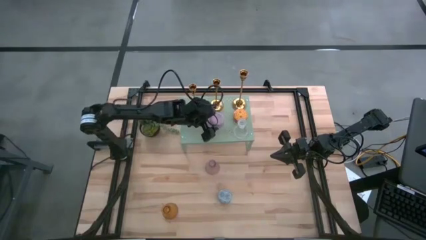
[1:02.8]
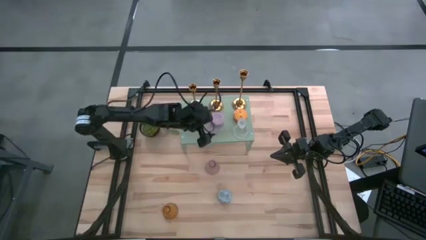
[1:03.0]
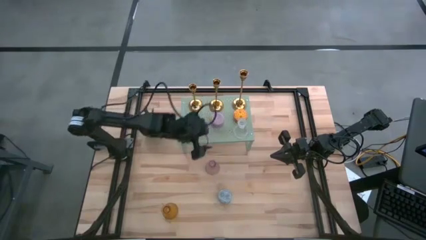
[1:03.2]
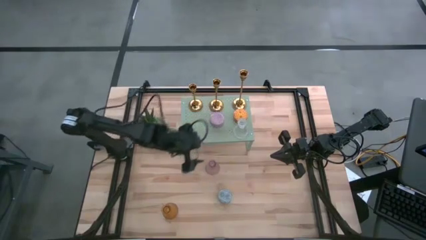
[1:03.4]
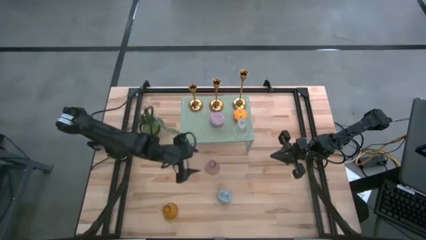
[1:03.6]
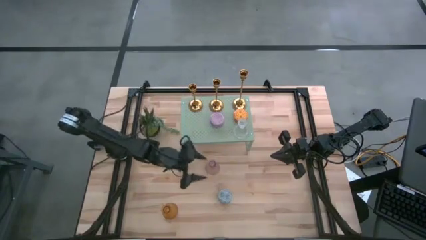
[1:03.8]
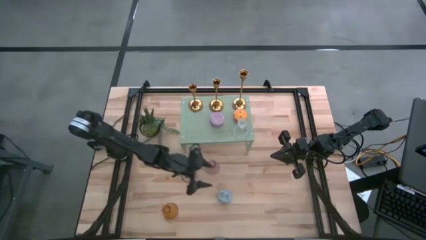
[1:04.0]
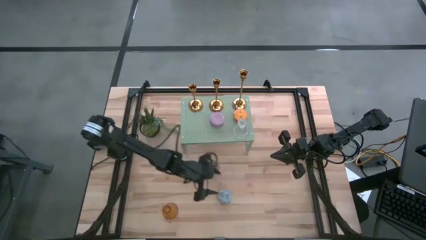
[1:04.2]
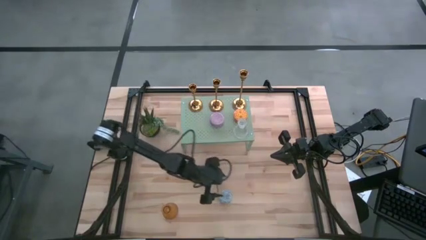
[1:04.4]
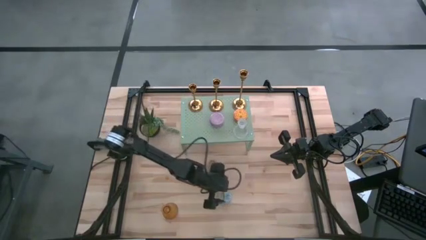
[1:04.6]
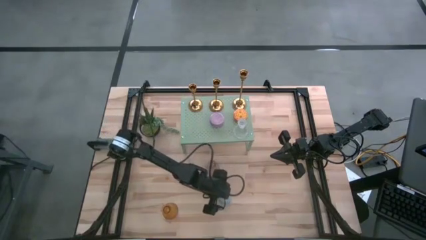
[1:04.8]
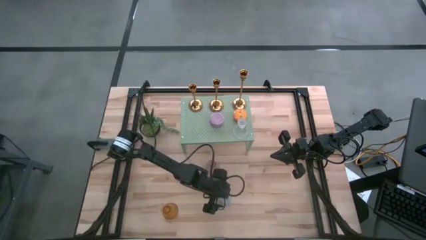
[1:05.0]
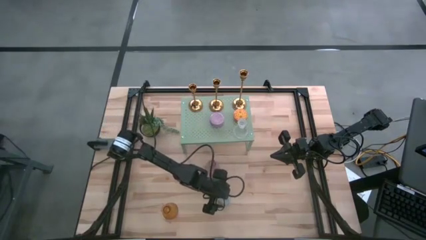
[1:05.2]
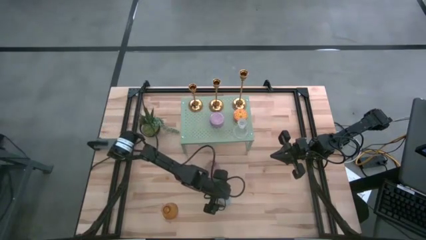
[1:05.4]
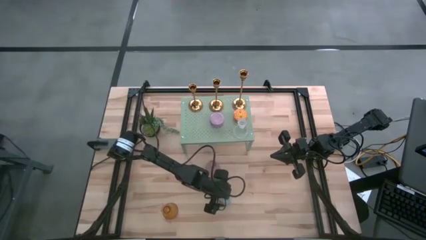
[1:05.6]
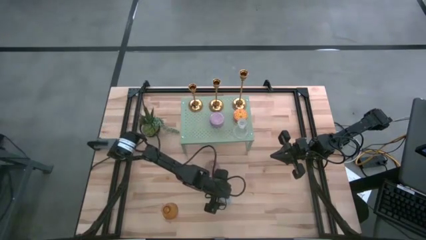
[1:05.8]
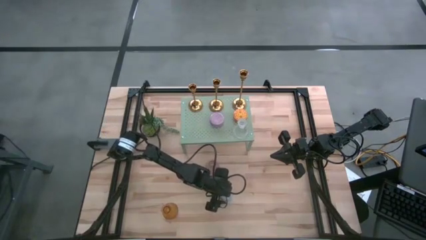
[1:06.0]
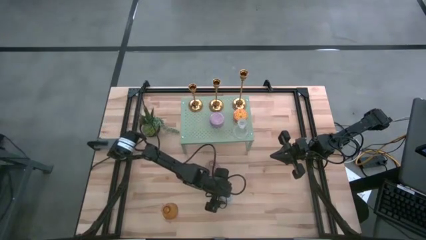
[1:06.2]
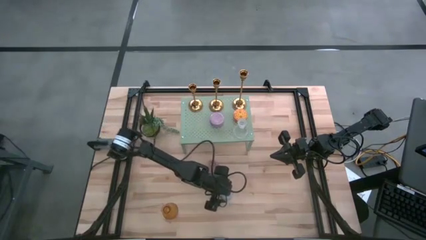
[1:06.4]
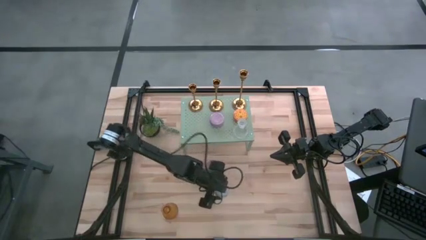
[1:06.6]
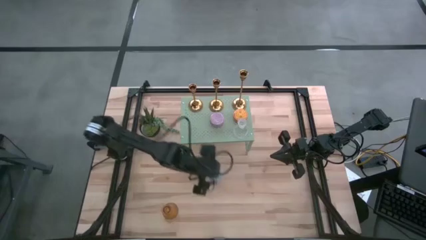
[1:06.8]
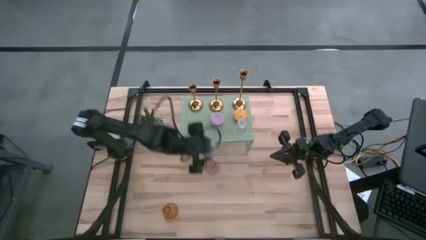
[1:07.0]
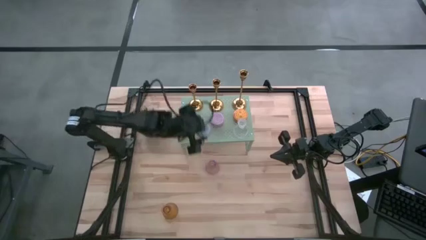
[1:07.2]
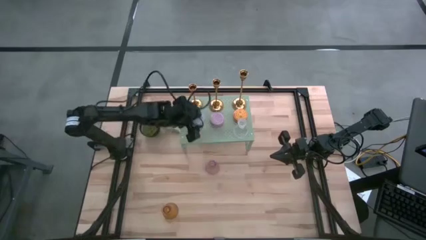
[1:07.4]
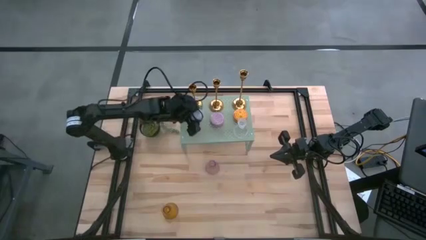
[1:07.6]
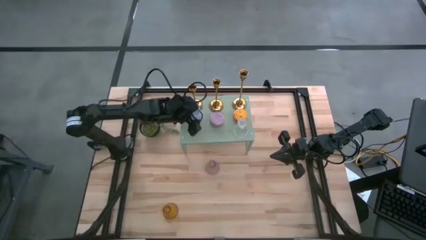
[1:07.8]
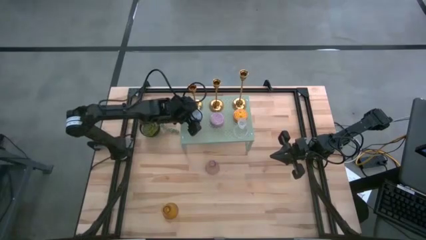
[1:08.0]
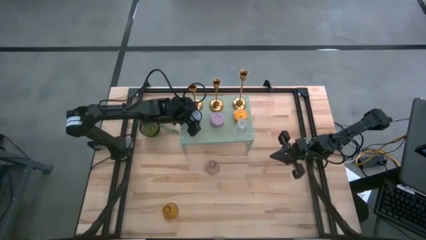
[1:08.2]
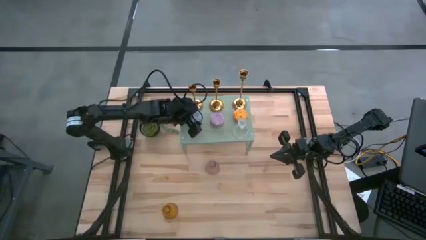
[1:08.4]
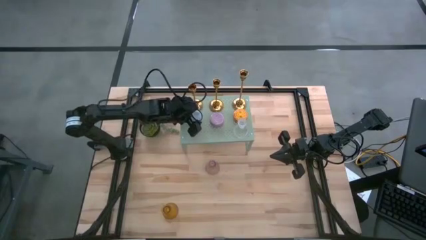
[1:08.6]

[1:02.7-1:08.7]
Task: Pick & Place candle stick holders
Put the blue scented candle on the shelf

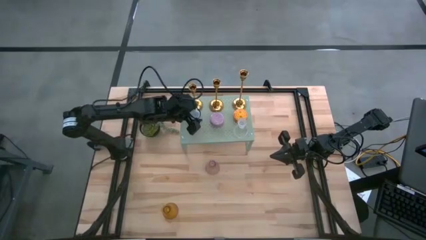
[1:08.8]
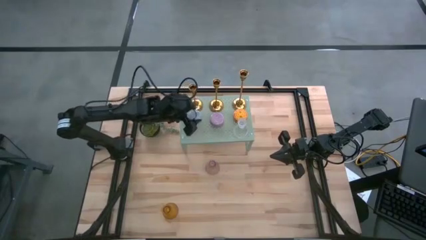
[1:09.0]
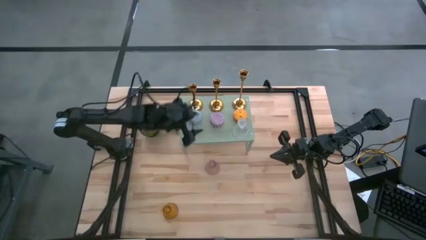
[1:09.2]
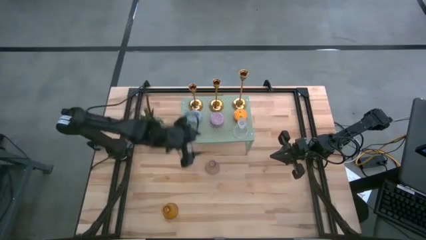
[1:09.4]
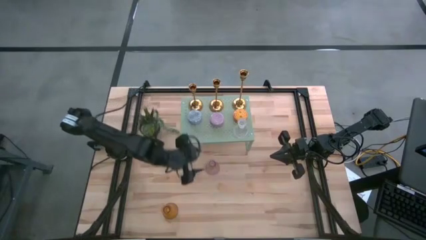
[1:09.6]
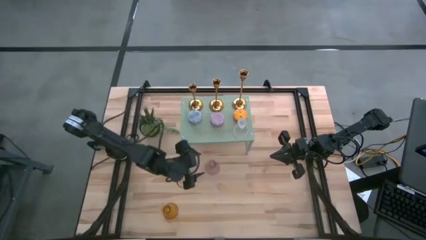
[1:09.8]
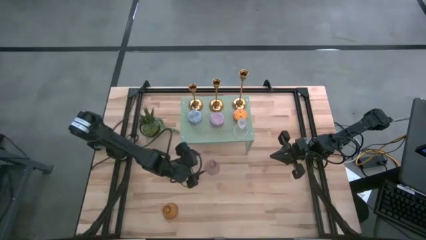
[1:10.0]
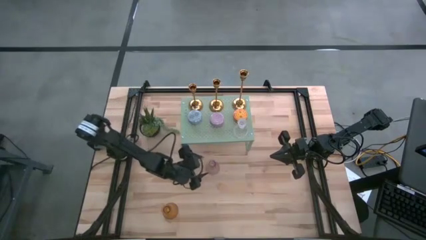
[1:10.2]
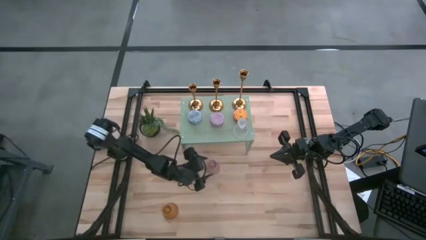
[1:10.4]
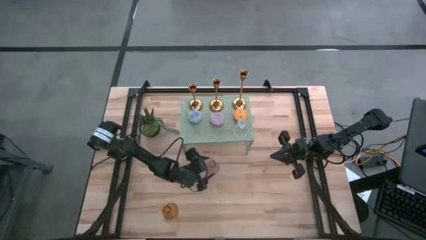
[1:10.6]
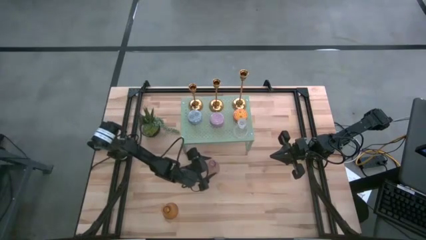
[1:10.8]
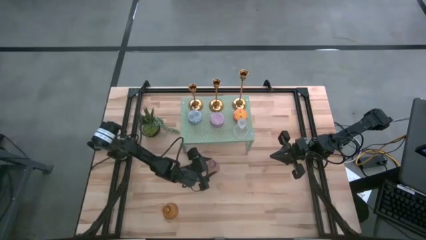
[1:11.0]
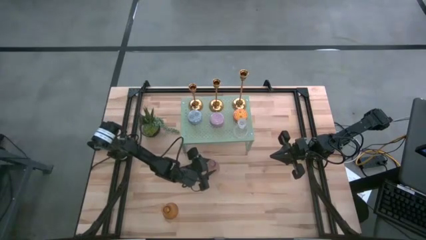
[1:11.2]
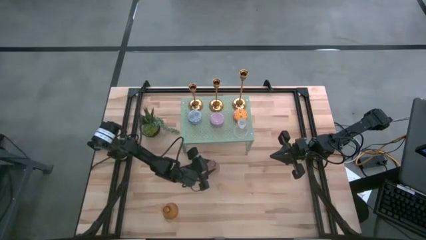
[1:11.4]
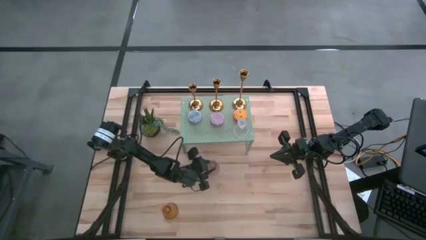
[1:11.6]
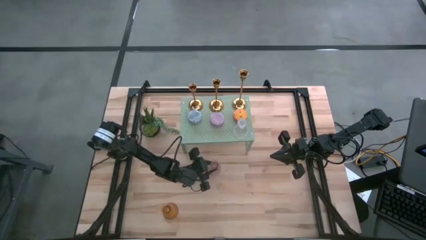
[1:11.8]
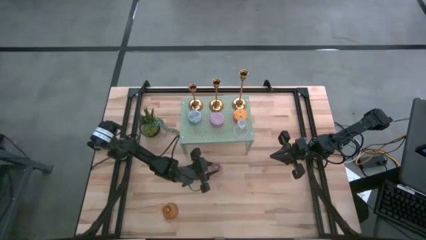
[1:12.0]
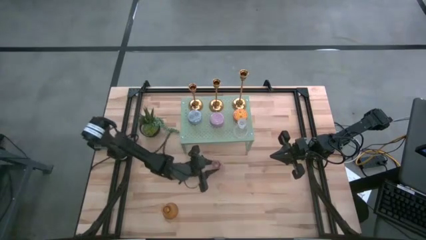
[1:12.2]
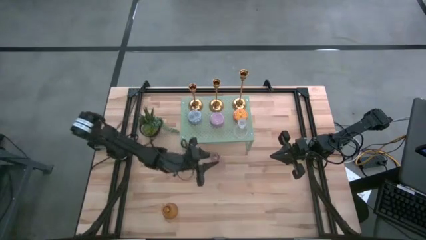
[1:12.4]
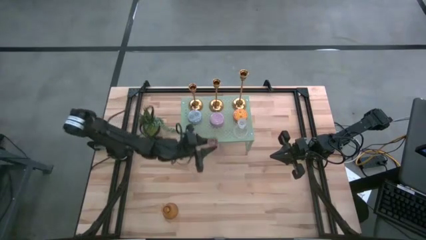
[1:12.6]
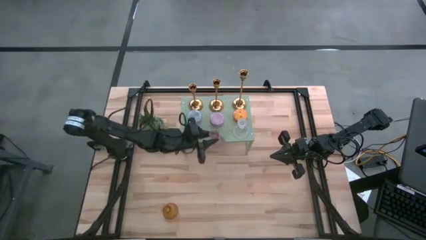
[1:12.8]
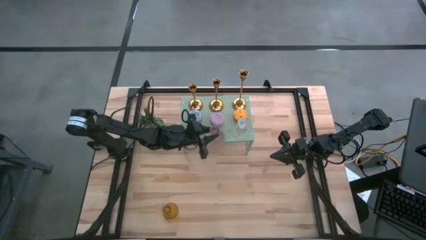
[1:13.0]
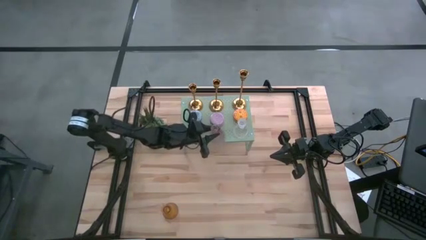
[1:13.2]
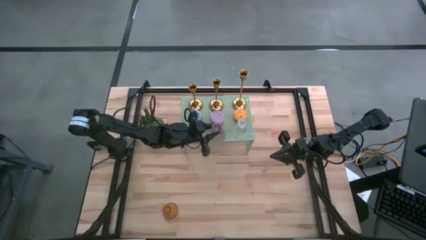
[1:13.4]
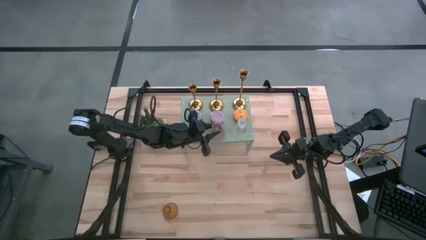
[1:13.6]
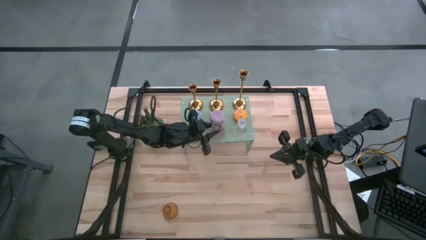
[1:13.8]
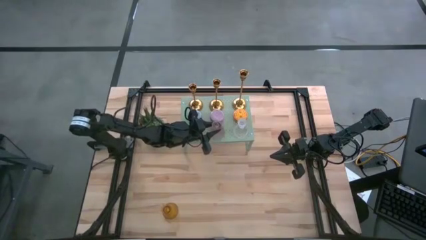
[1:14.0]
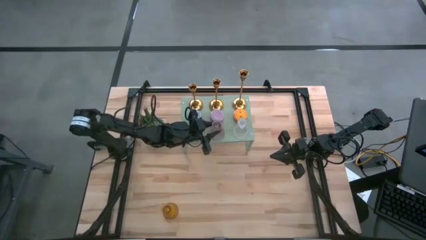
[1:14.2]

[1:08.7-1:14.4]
Put the purple glass candle holder on the shelf

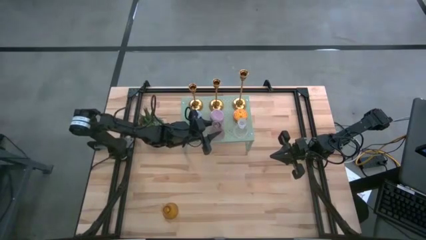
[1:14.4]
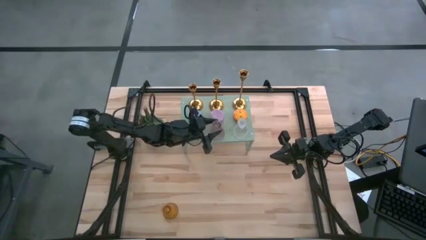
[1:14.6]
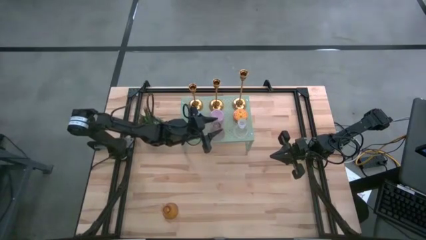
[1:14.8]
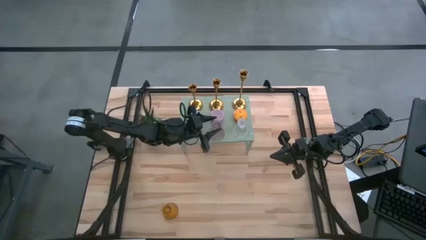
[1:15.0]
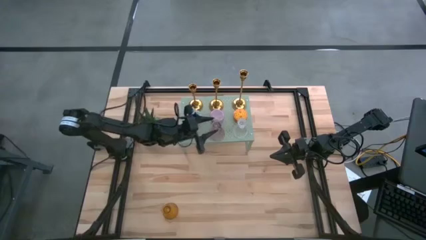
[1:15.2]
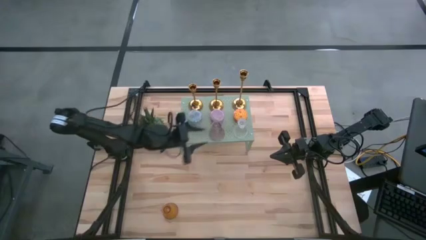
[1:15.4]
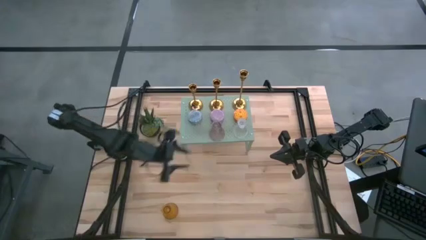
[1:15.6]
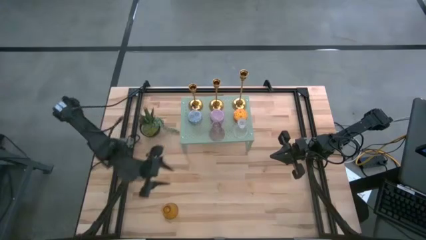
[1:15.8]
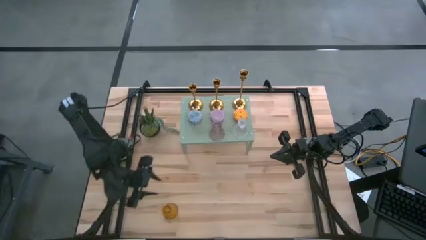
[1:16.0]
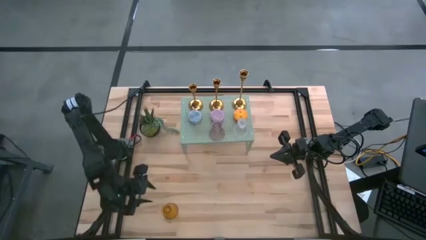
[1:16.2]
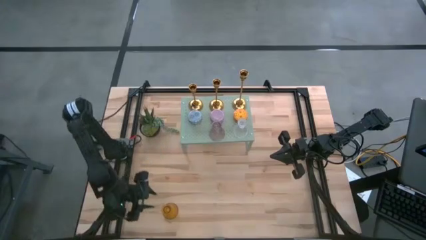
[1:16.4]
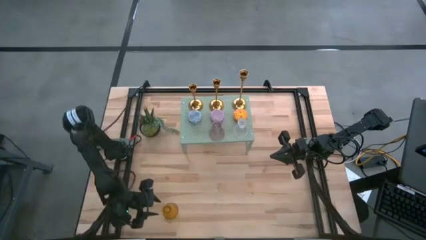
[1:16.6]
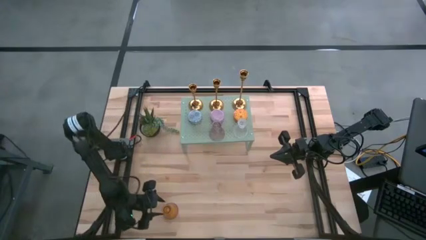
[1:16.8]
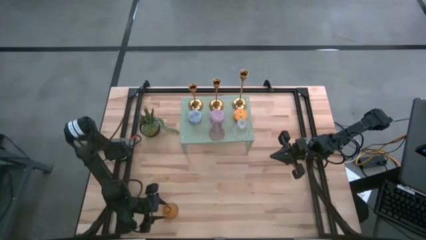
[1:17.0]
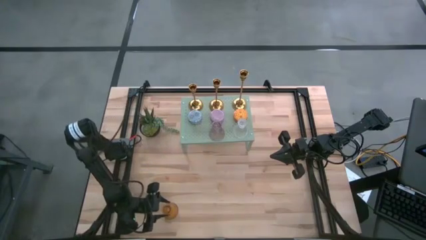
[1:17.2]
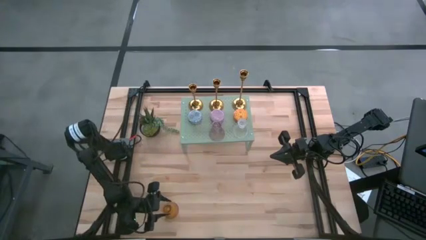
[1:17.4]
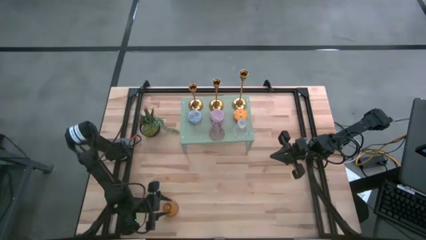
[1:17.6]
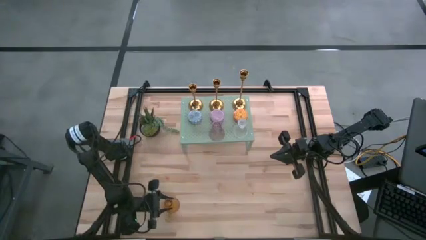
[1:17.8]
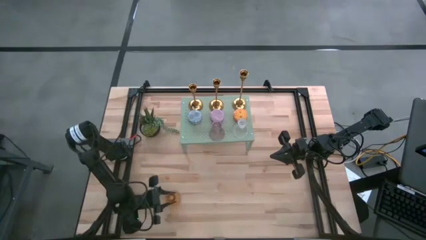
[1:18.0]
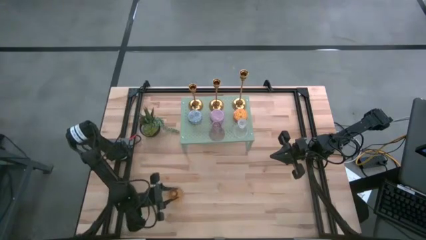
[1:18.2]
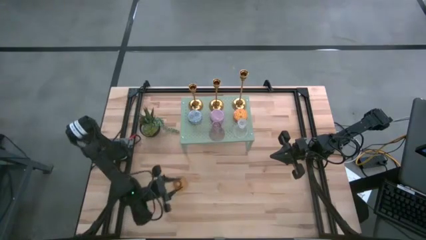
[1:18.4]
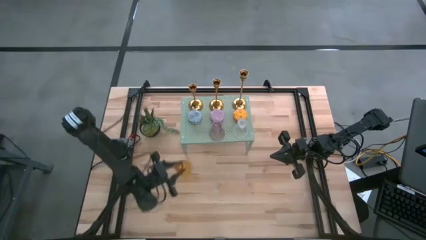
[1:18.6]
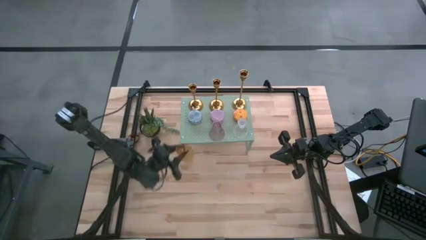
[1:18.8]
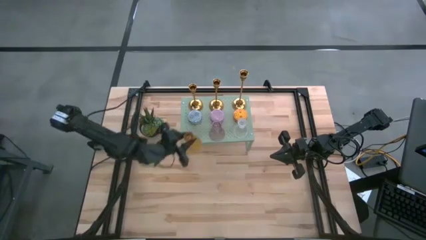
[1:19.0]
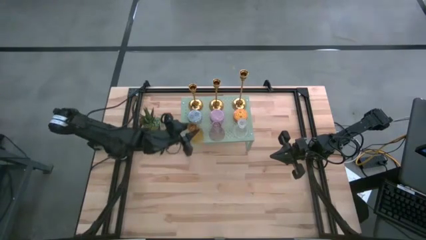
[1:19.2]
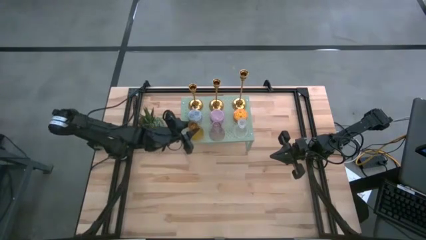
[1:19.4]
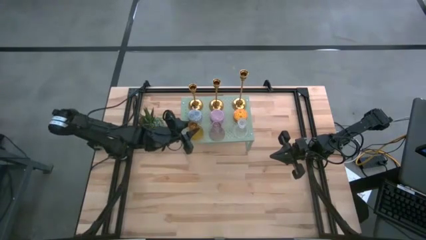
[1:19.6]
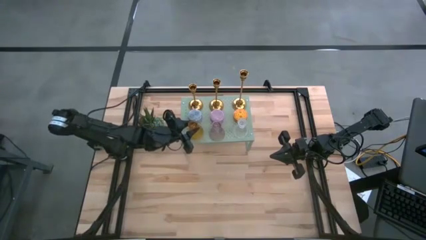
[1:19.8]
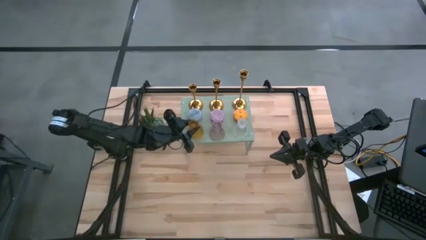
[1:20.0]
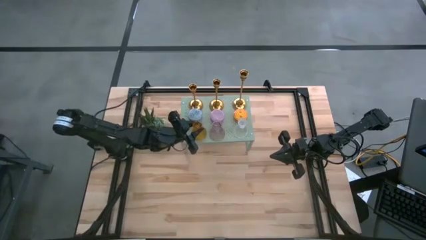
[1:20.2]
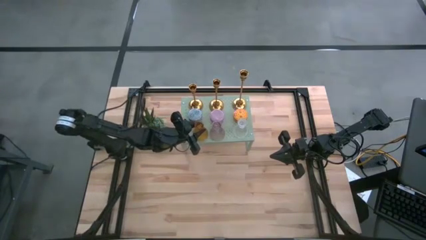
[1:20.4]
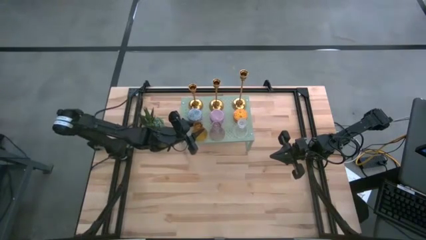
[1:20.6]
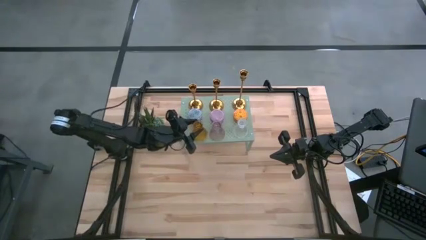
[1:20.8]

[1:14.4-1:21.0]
Put the orange glass candle holder on the shelf
